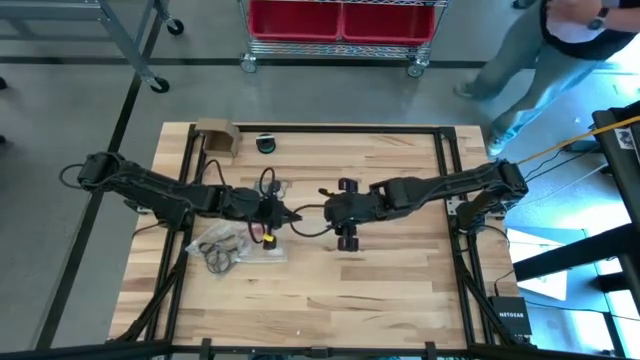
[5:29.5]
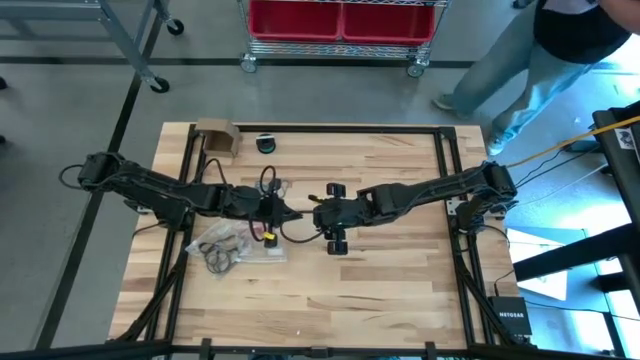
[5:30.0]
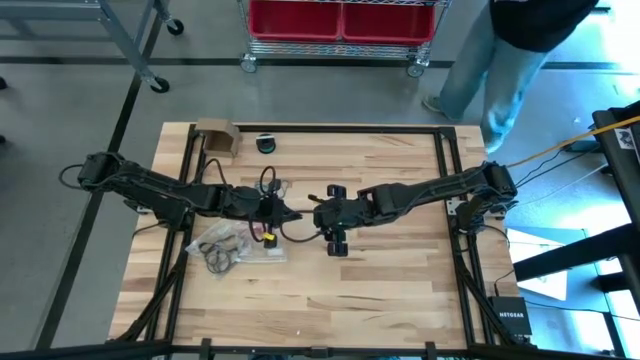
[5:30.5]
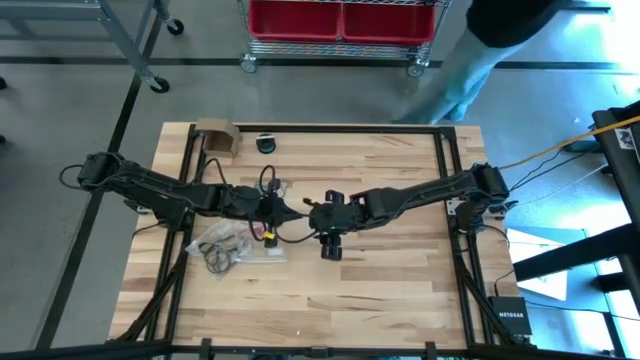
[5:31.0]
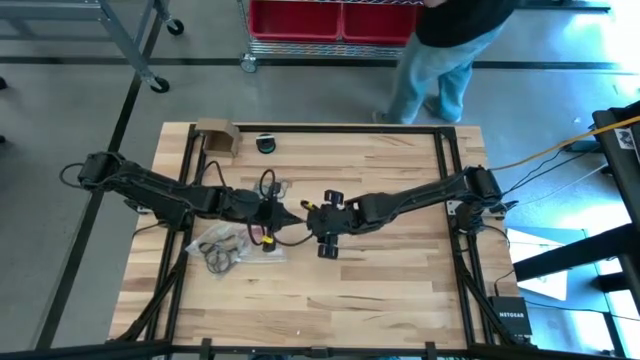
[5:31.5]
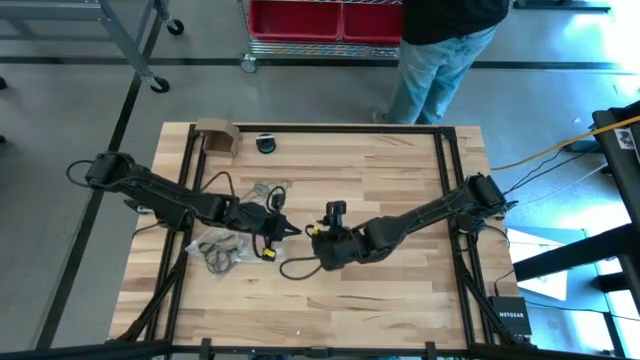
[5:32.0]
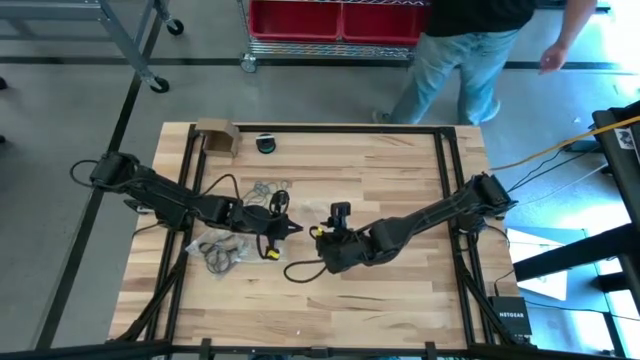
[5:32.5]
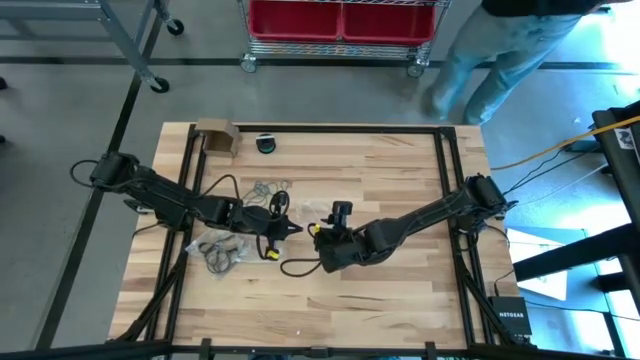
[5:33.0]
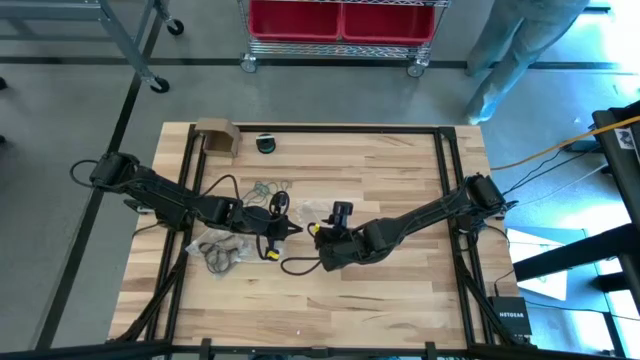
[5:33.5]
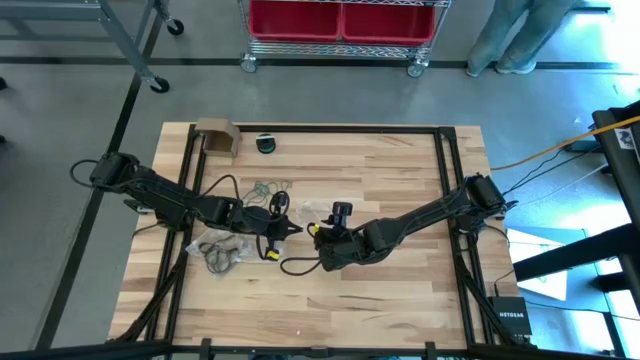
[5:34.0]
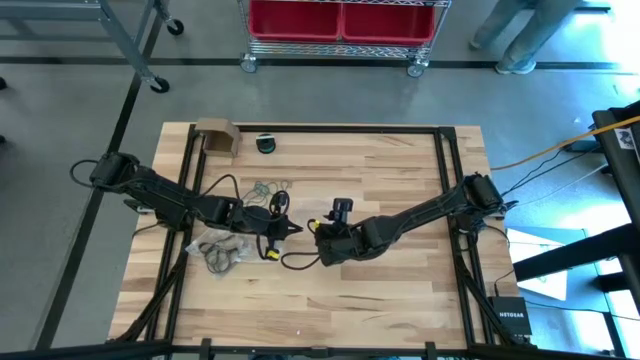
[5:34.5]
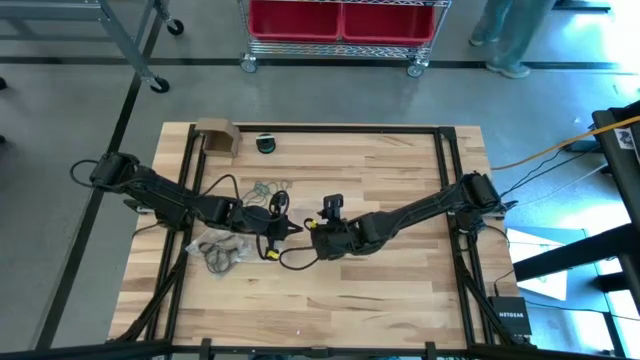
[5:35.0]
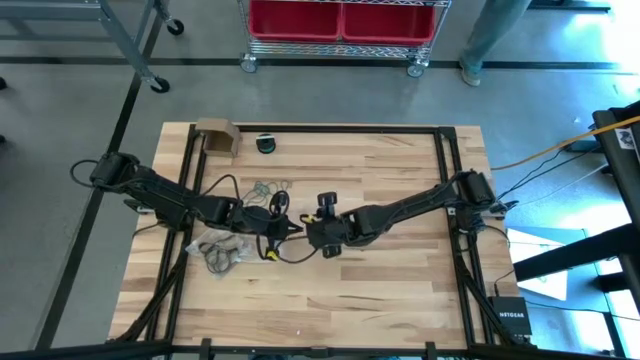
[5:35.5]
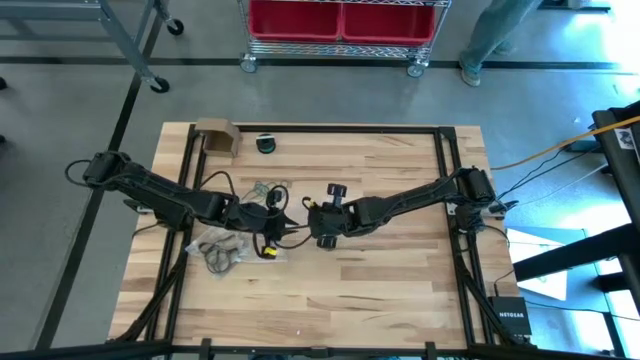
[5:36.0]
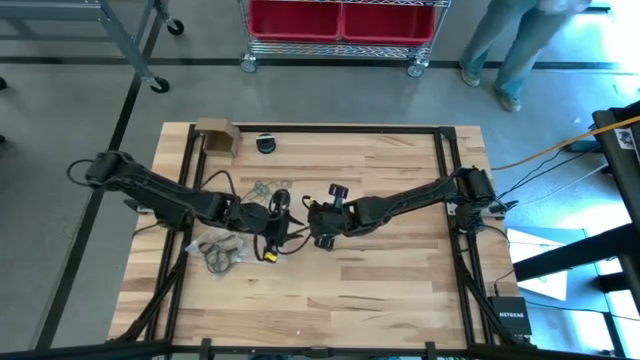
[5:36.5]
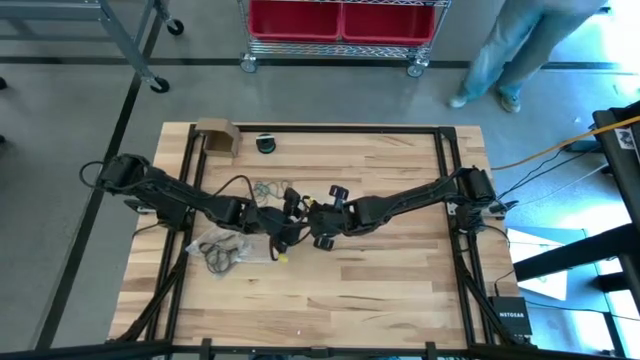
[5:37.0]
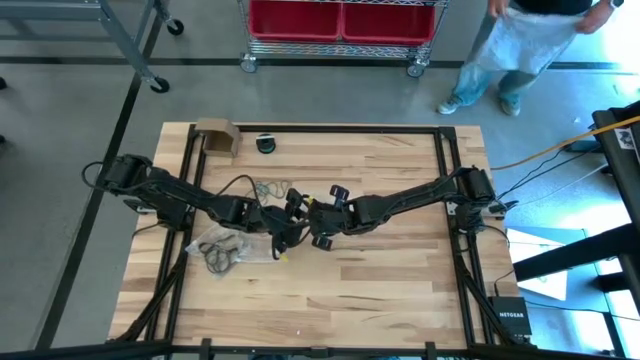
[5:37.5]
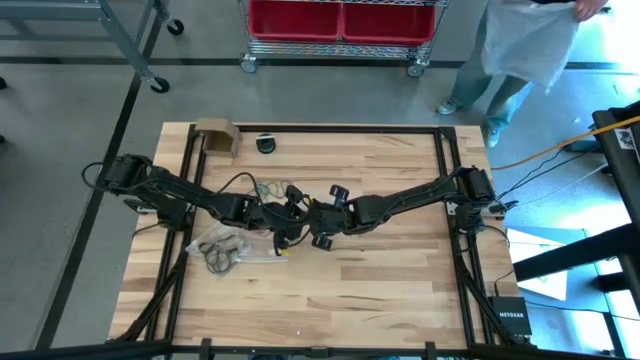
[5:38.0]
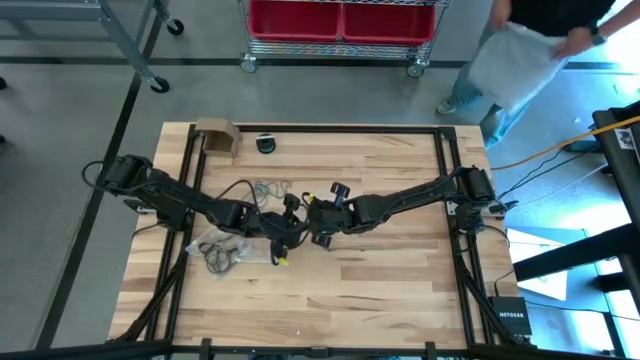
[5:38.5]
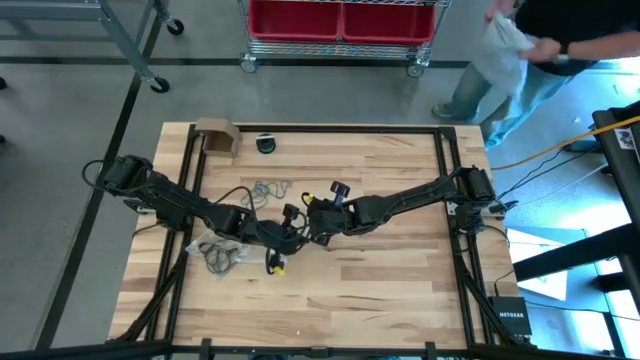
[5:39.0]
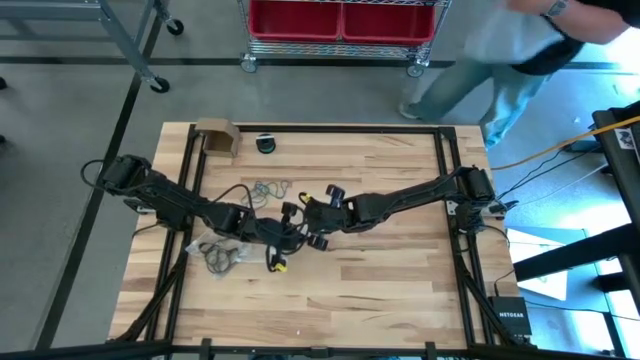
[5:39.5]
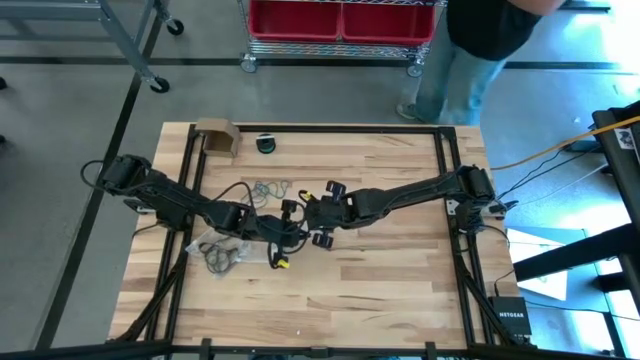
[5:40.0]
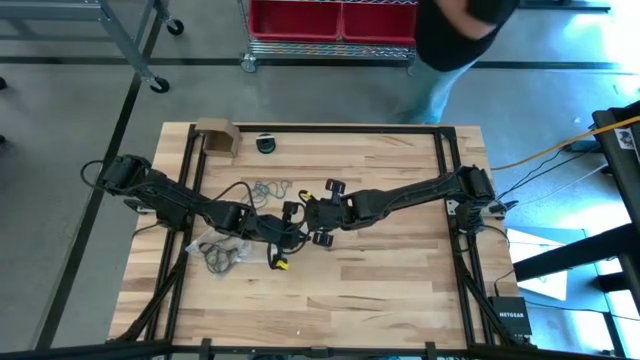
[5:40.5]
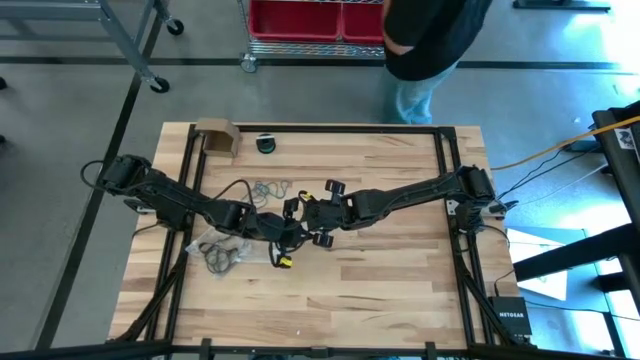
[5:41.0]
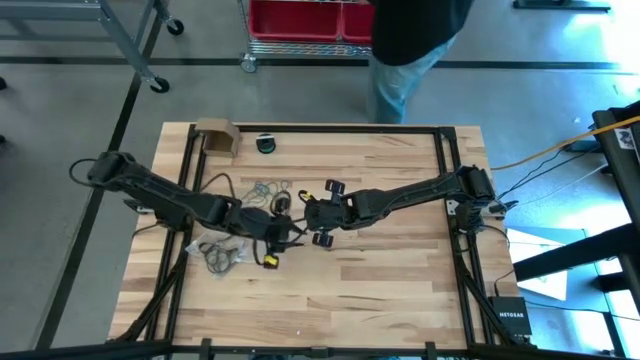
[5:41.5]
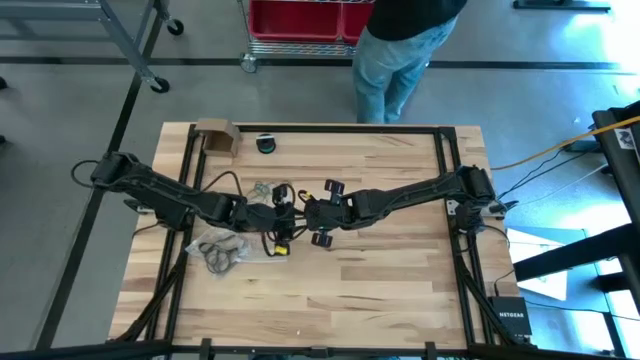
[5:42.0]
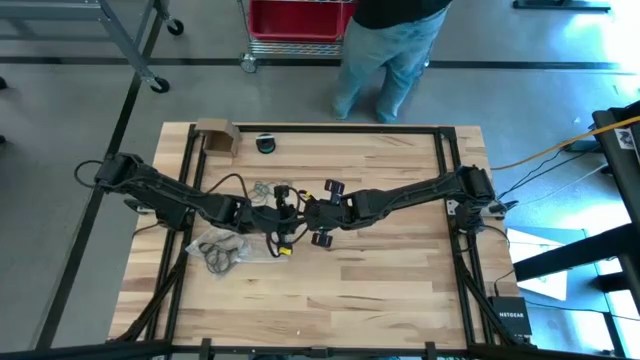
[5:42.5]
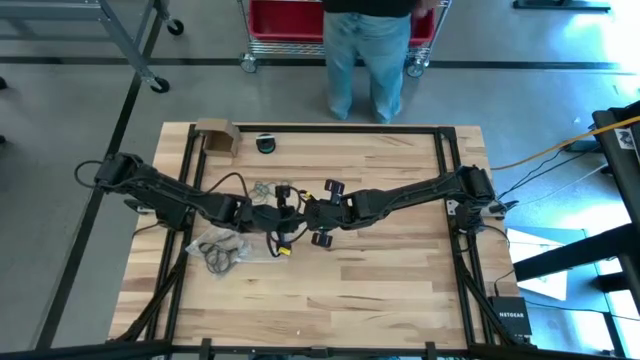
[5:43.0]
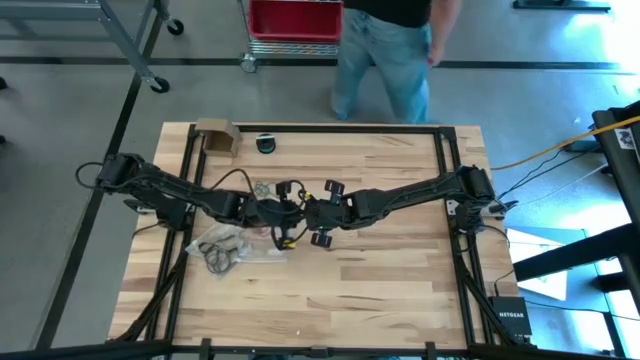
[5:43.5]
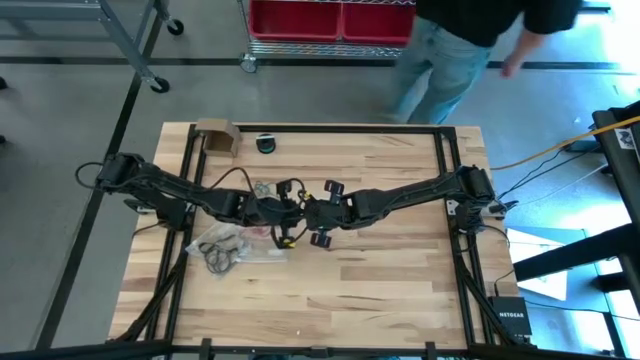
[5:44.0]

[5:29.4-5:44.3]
Task: Sort rubber bands
Put the blue rubber band into the transparent zip bag

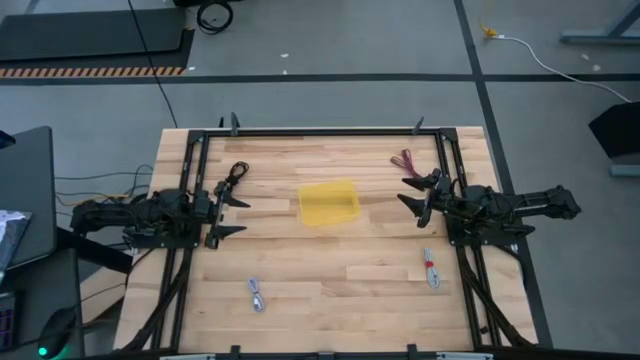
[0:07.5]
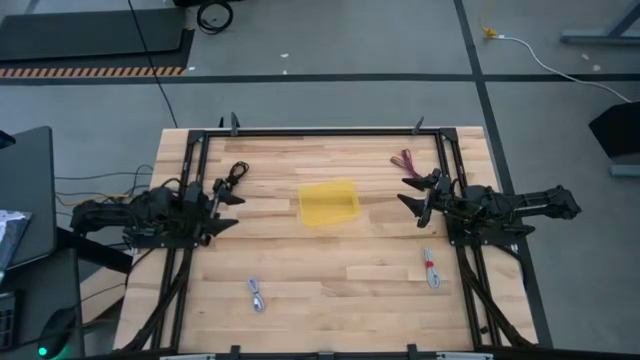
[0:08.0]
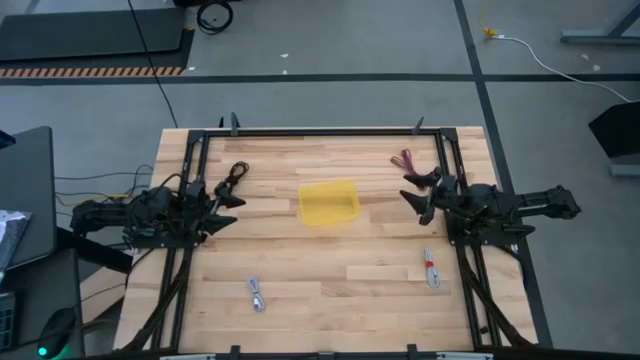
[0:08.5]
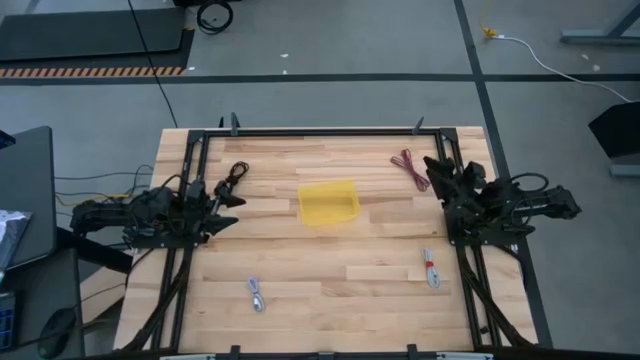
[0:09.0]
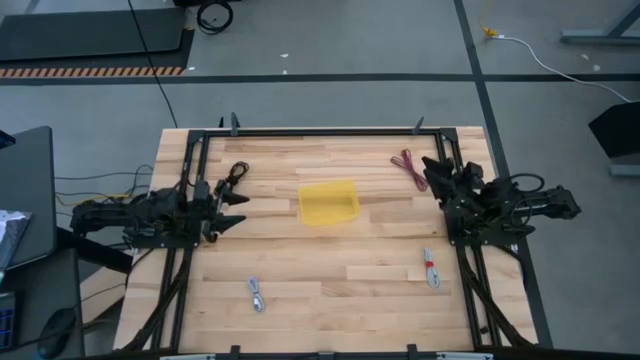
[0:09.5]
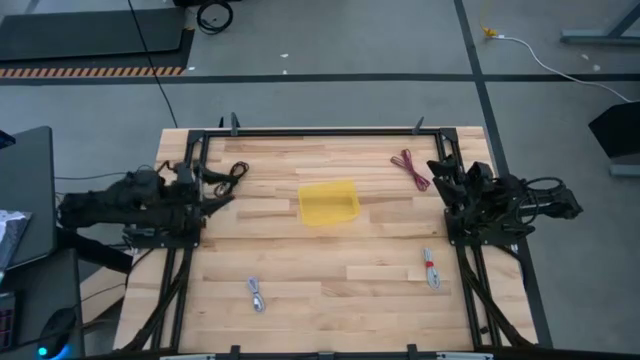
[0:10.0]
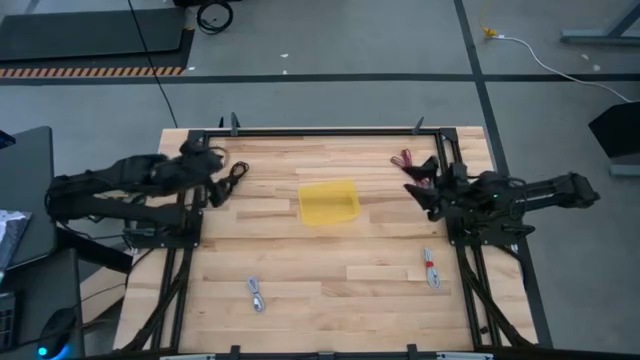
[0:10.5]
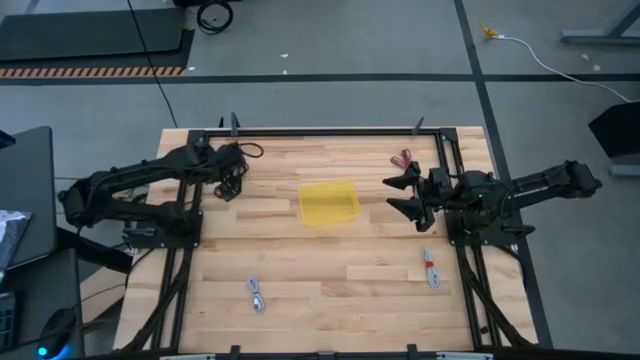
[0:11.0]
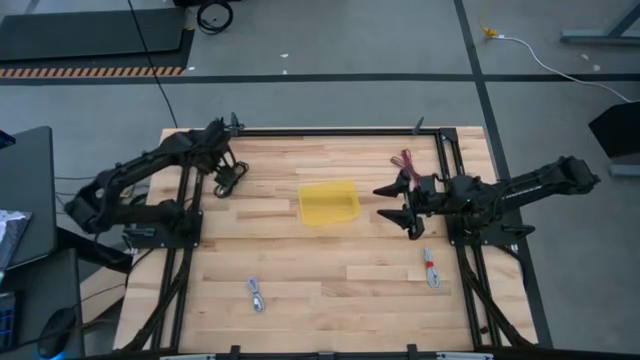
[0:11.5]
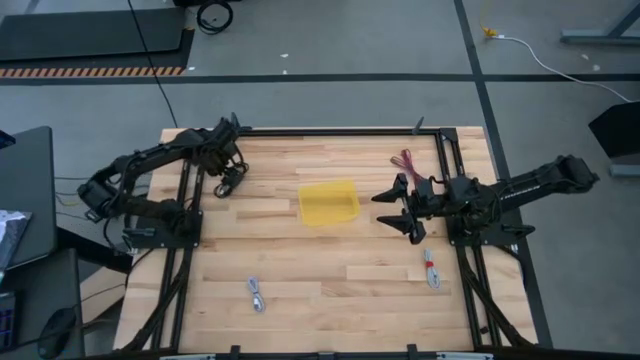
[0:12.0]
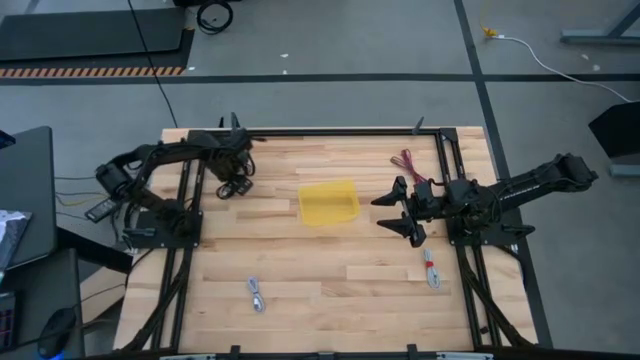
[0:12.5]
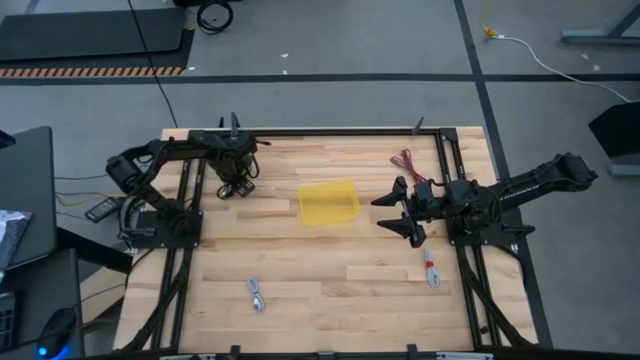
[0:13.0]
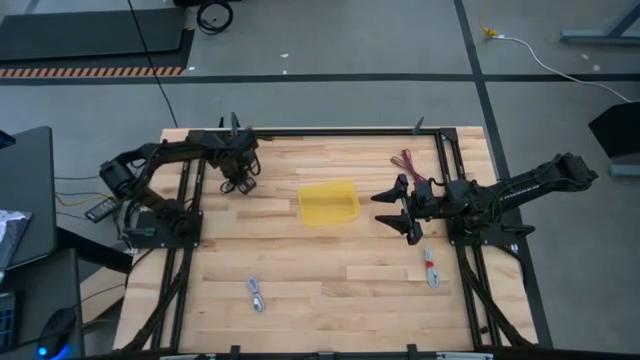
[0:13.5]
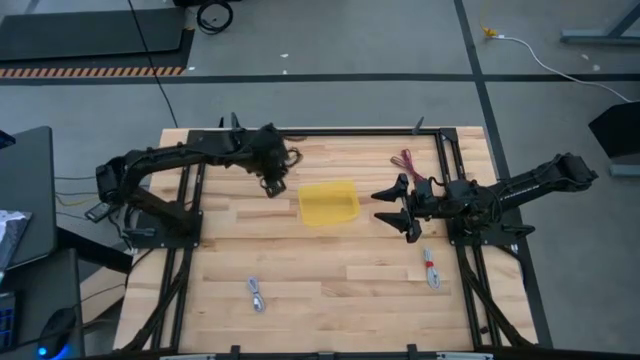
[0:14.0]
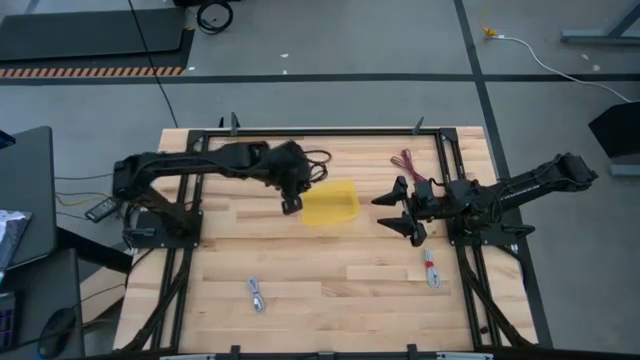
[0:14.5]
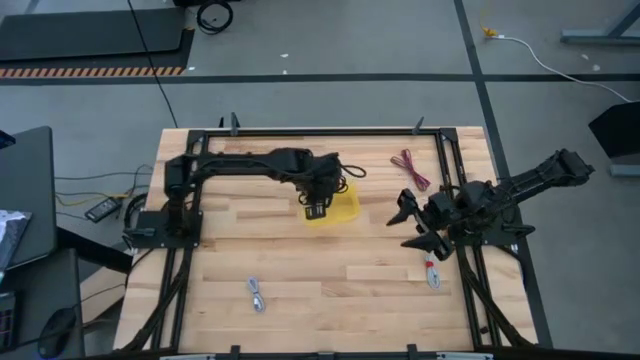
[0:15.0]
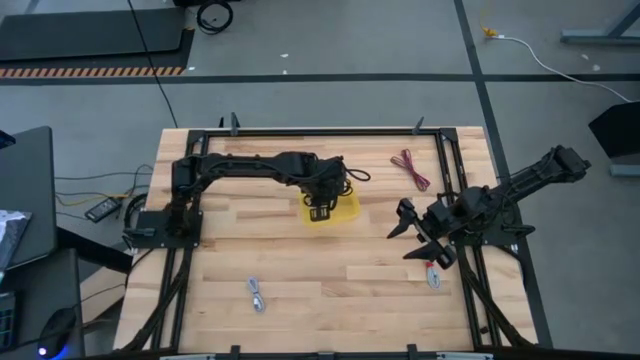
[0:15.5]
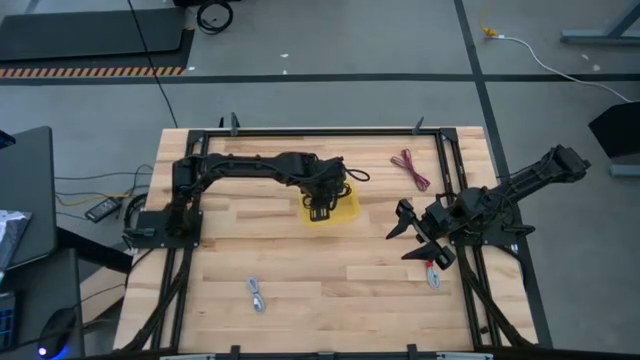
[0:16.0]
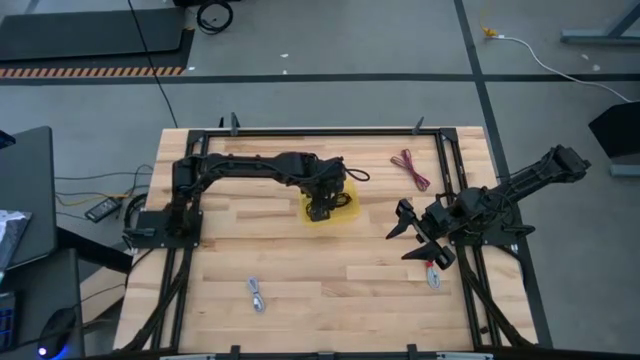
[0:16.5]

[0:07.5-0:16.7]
Task: Pick and place USB-C Cables
Put the black cable charger into the yellow bin
